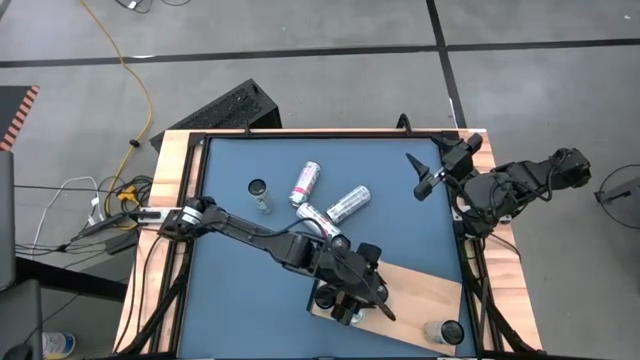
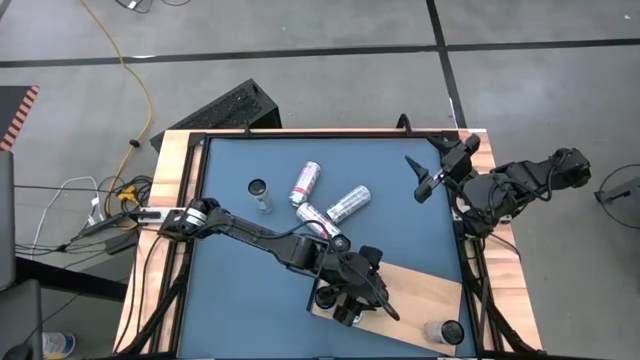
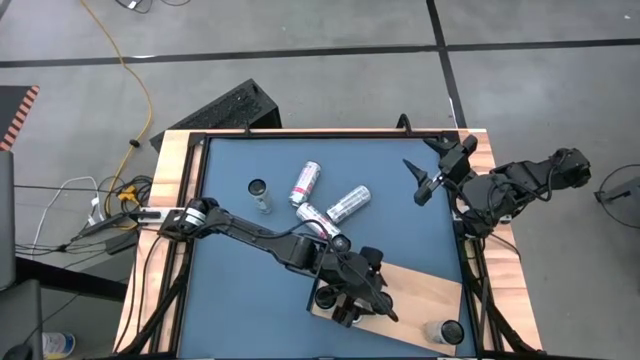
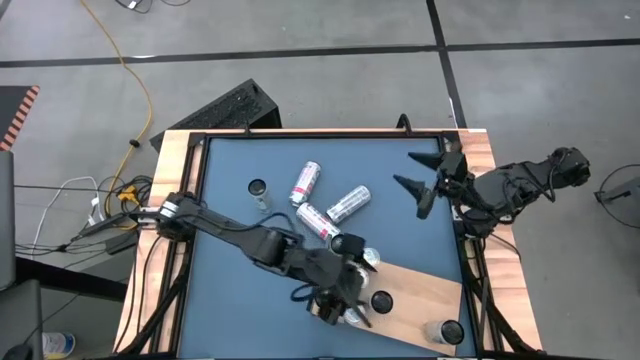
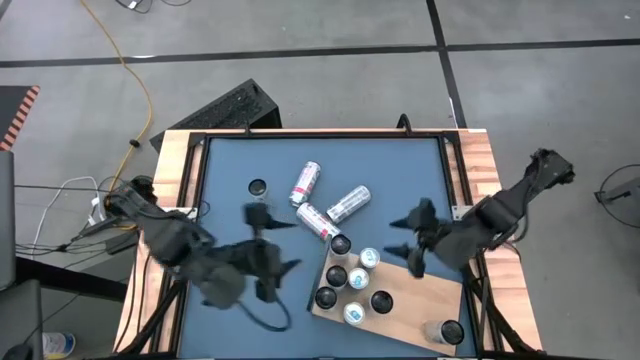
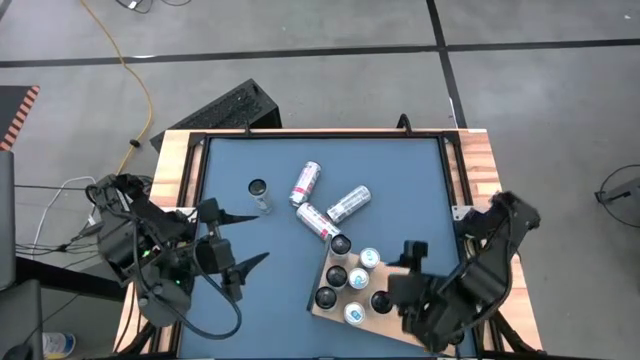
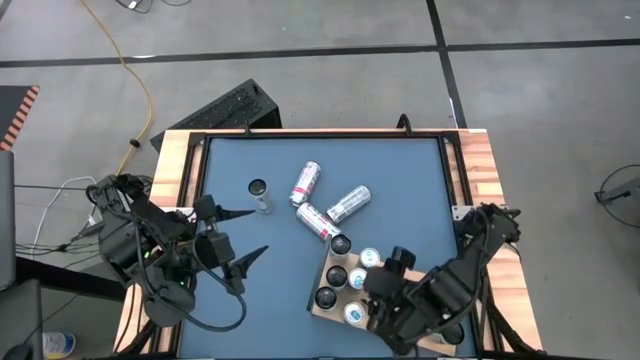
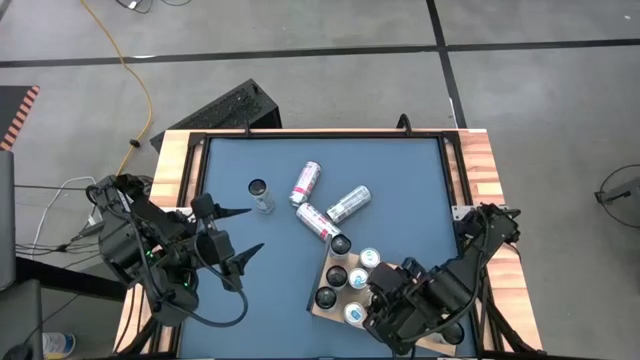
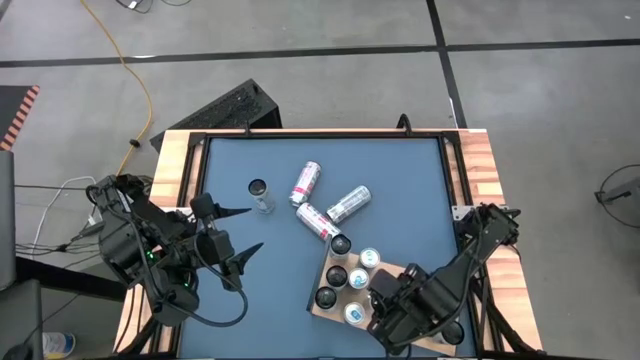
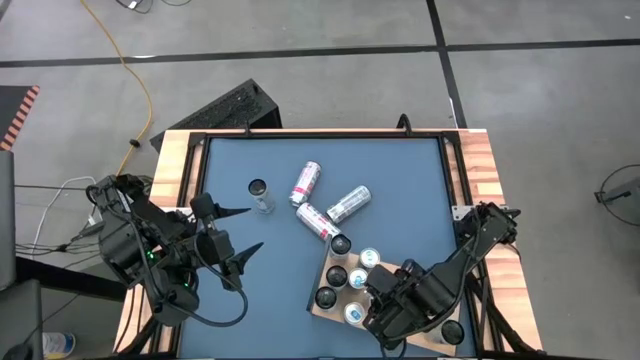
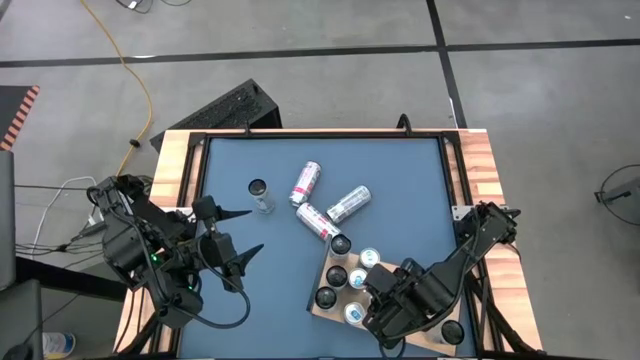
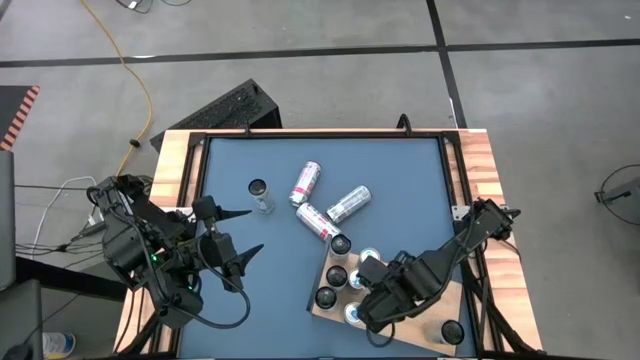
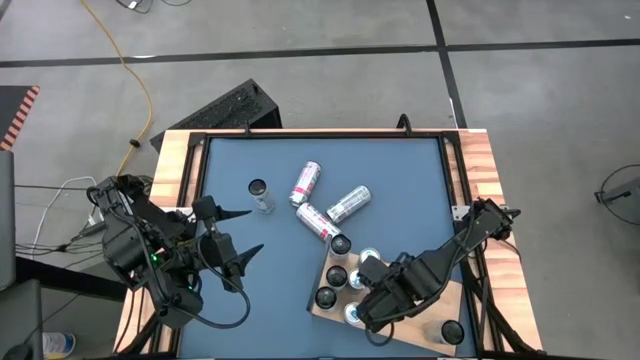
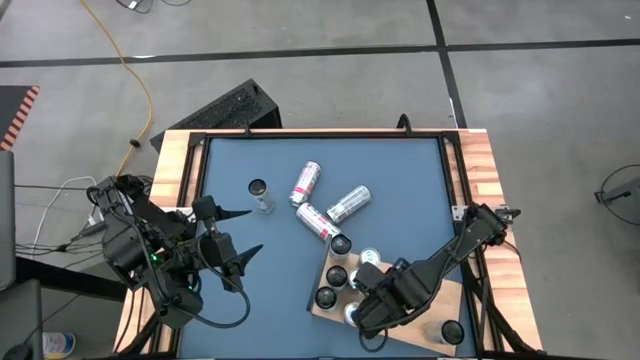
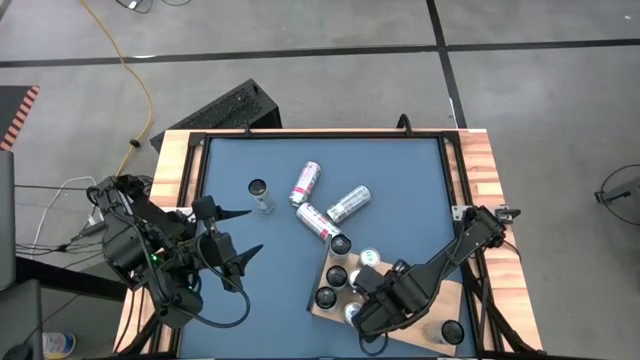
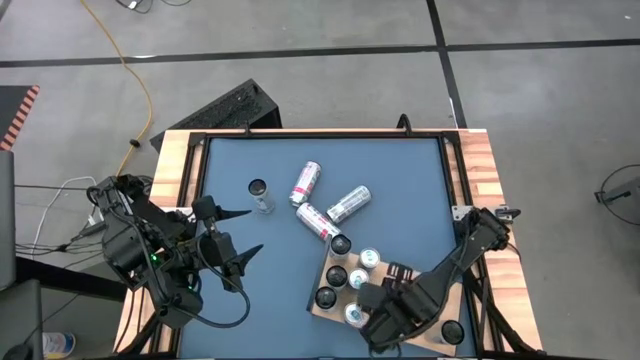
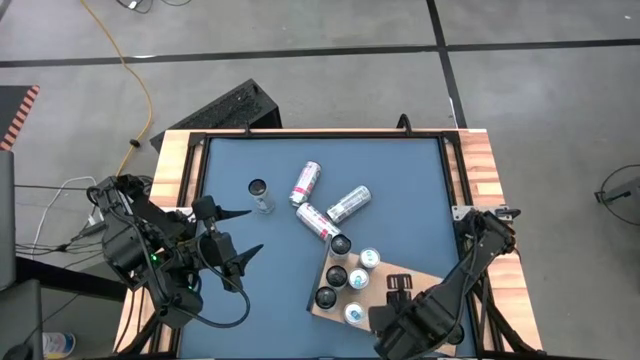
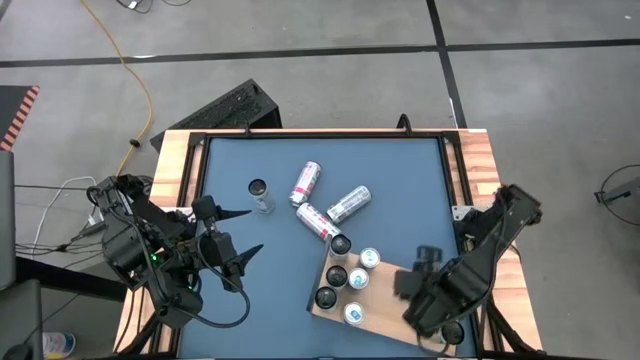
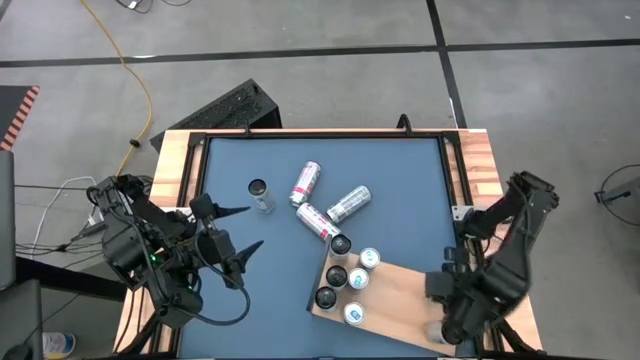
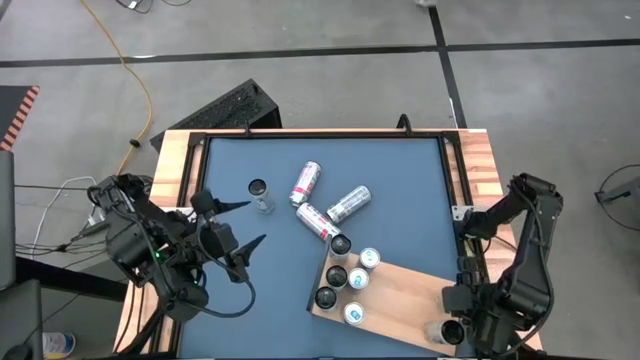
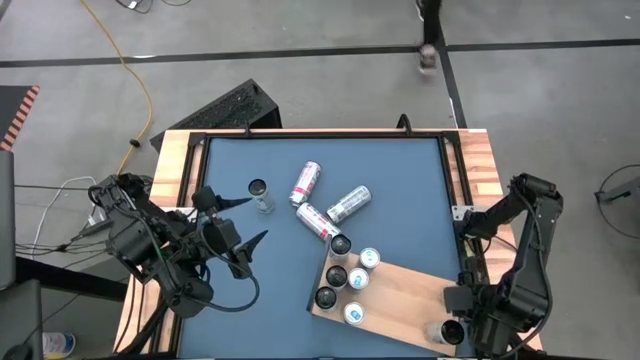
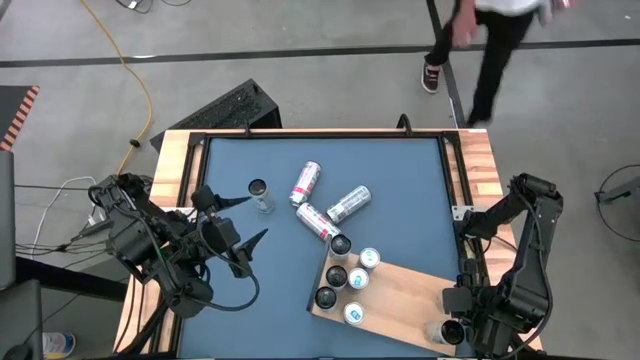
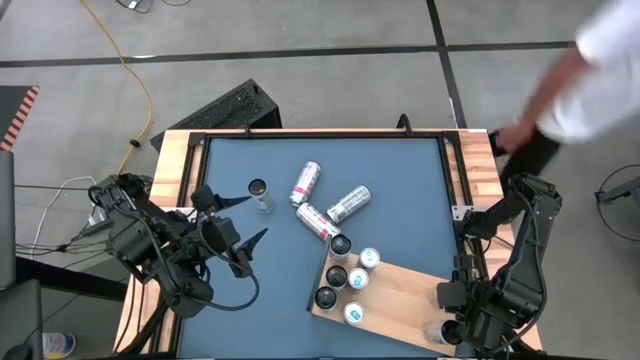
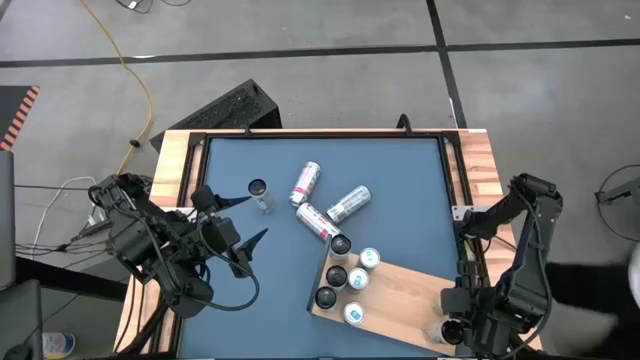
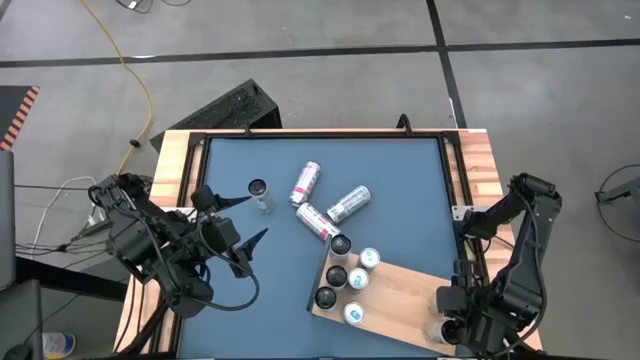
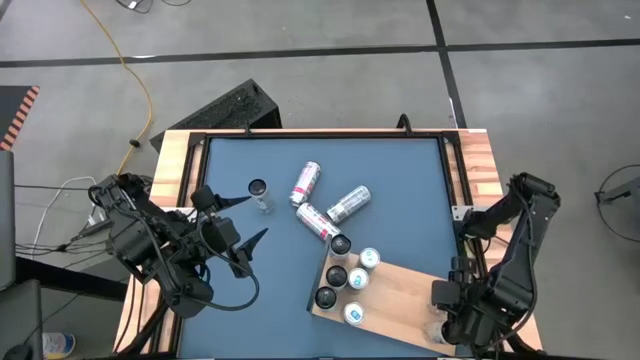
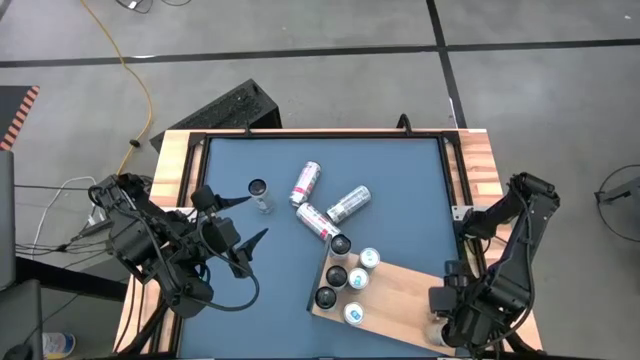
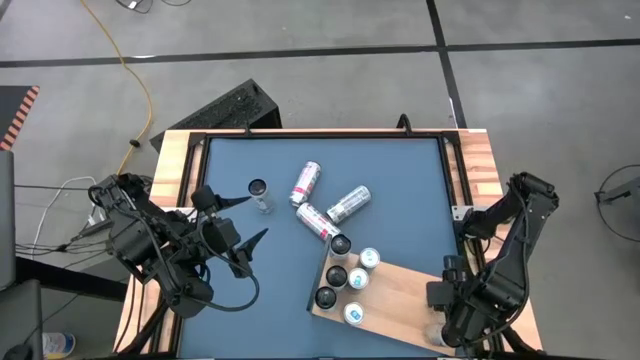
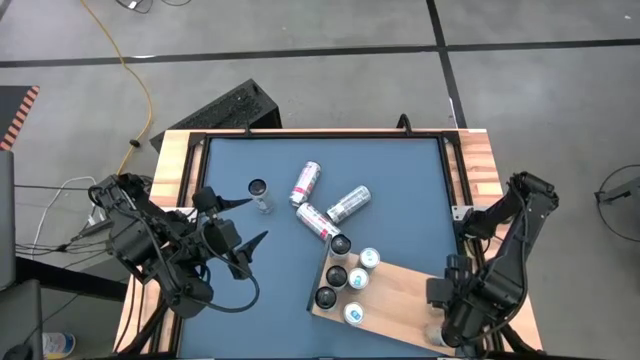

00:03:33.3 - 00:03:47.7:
Task: Place canned beverage on shelf
Put the left white yellow soda can on the shelf

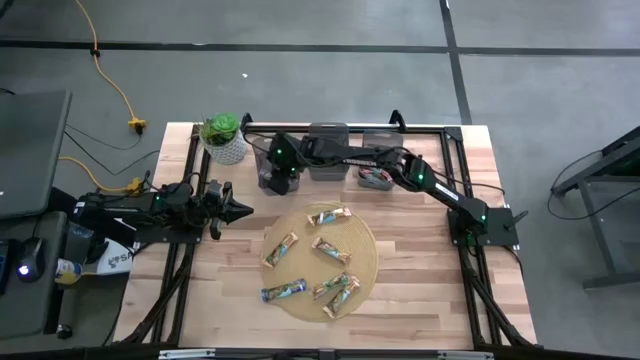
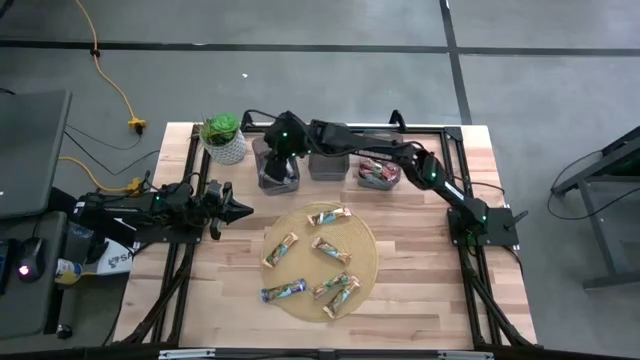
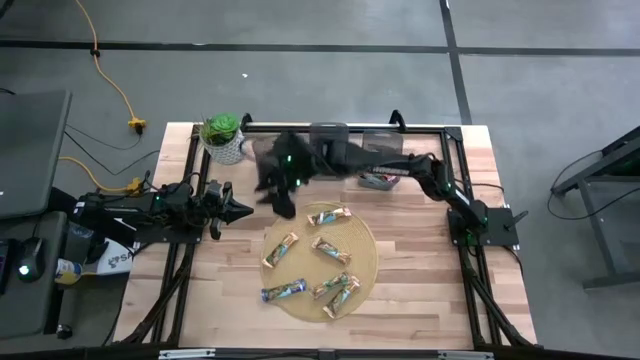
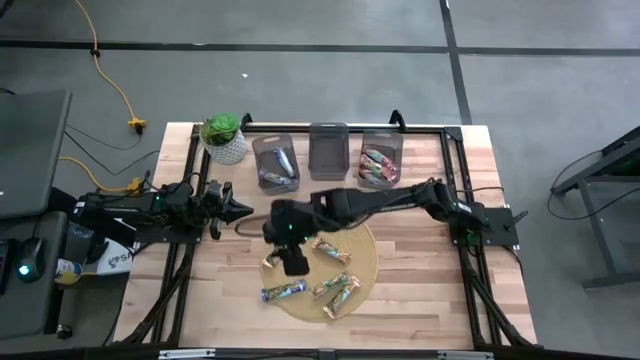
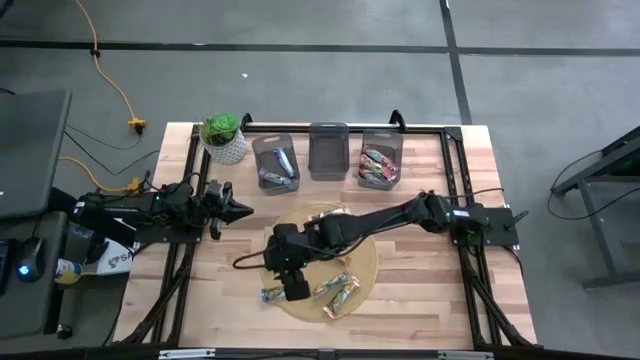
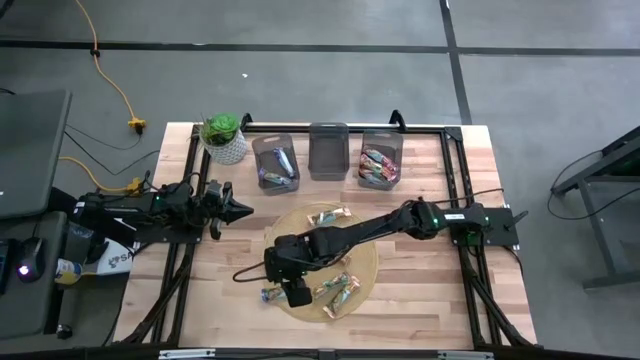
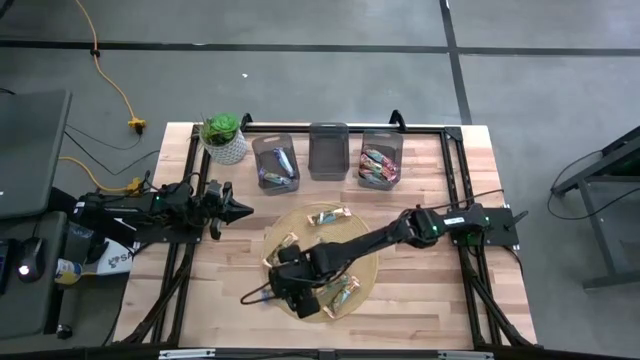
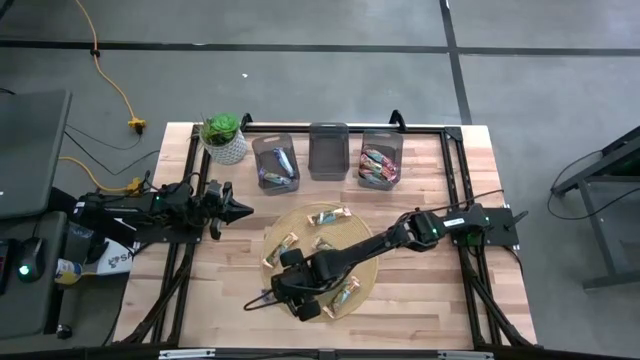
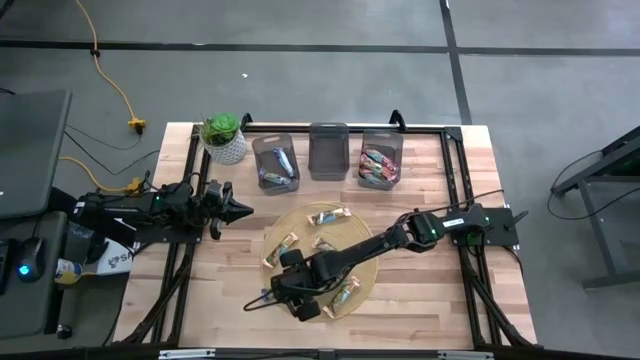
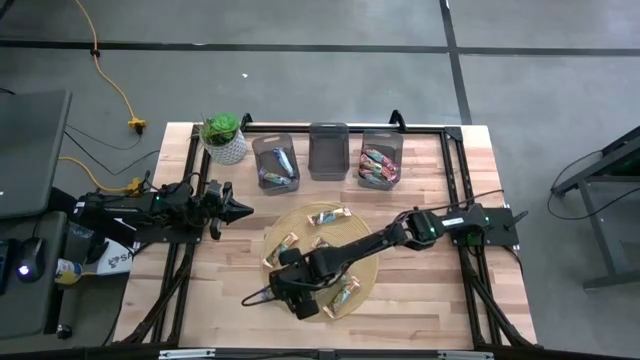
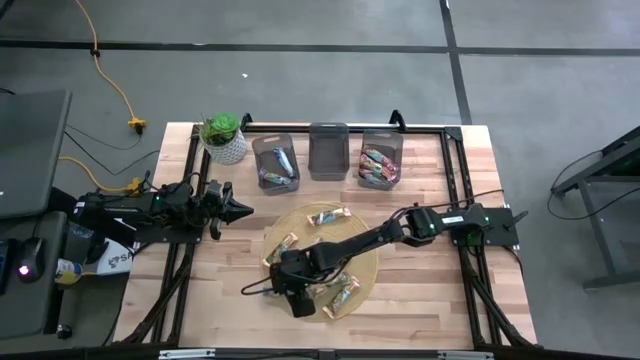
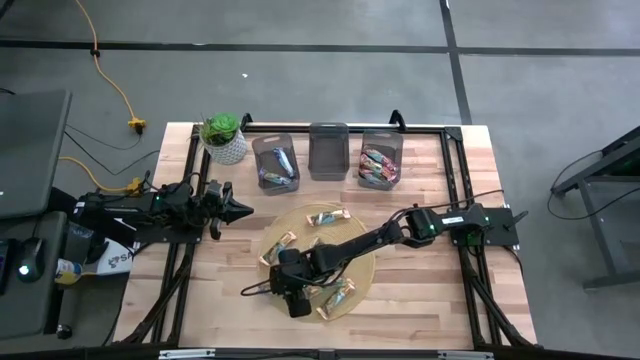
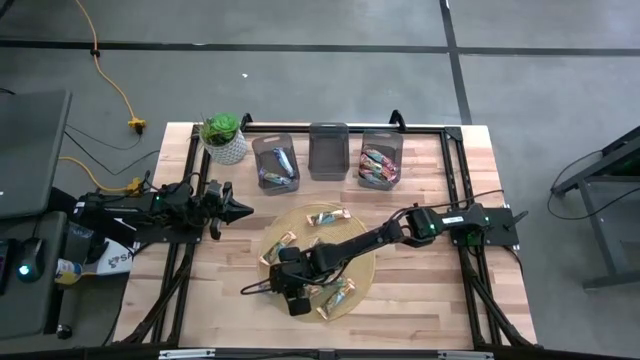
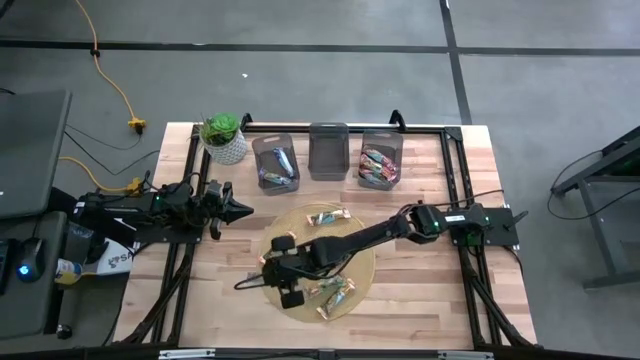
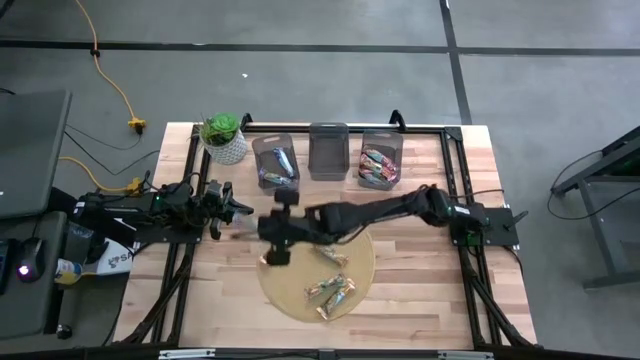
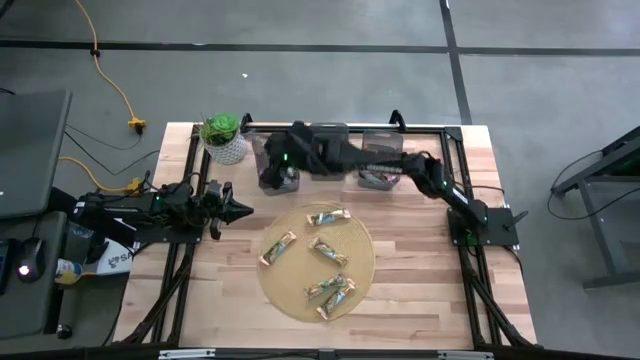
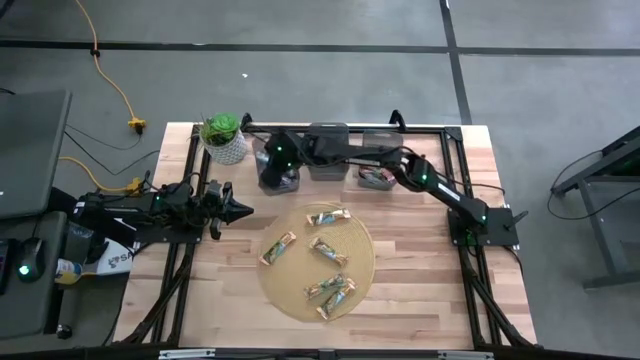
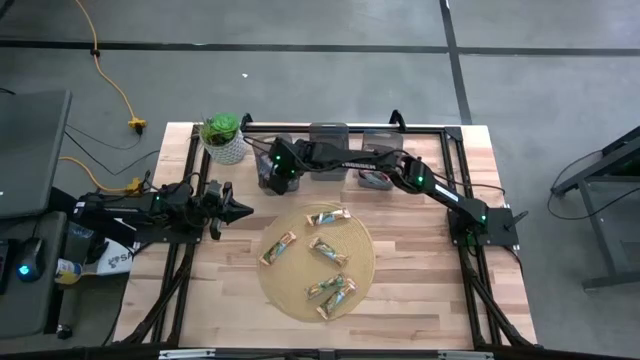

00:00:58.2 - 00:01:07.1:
Task: Pick and place Granola Bars by type
Put the blue granola bar into the left black bin
